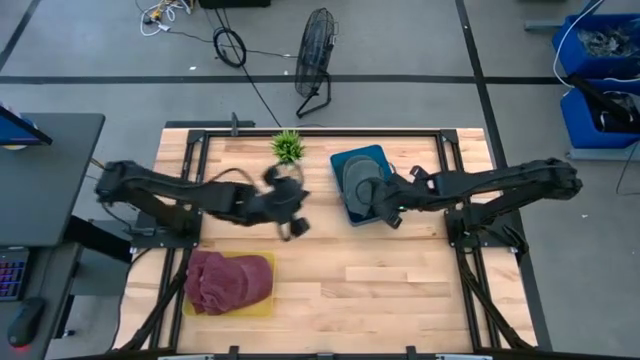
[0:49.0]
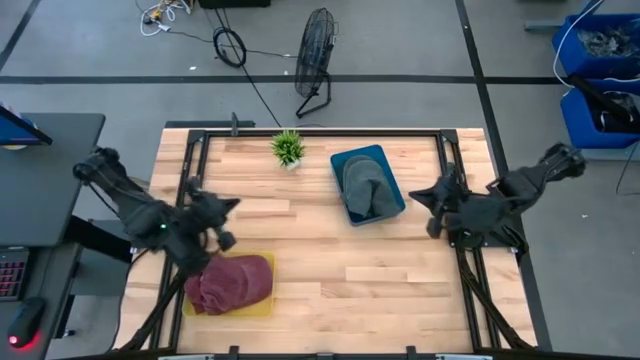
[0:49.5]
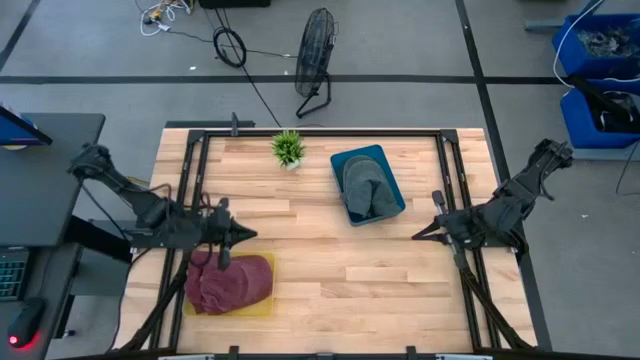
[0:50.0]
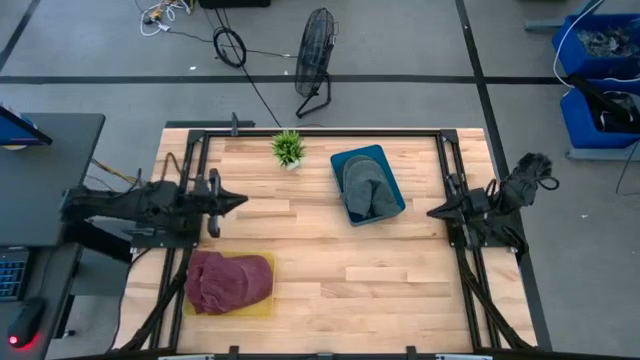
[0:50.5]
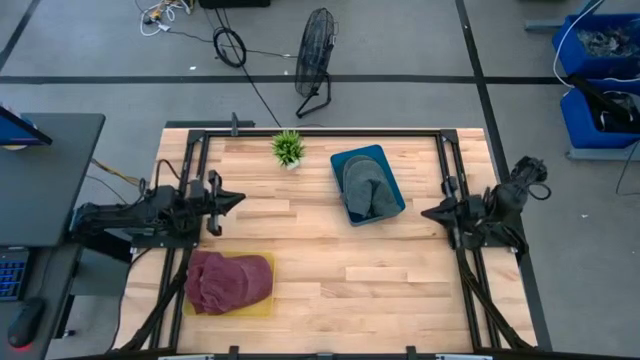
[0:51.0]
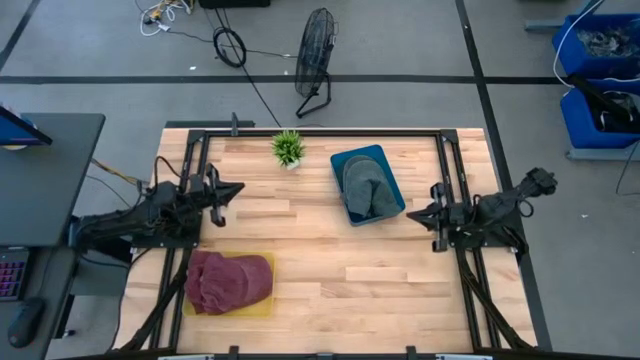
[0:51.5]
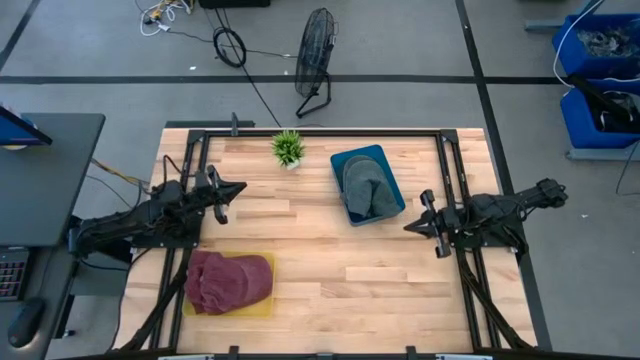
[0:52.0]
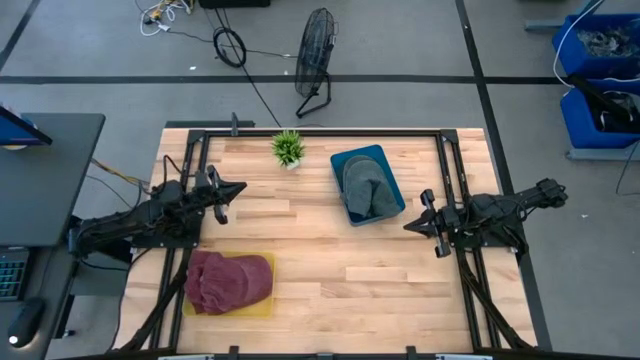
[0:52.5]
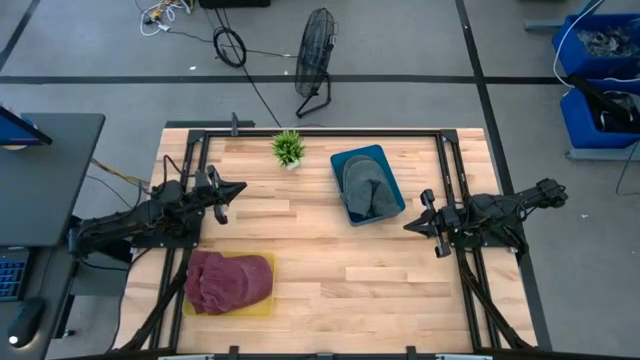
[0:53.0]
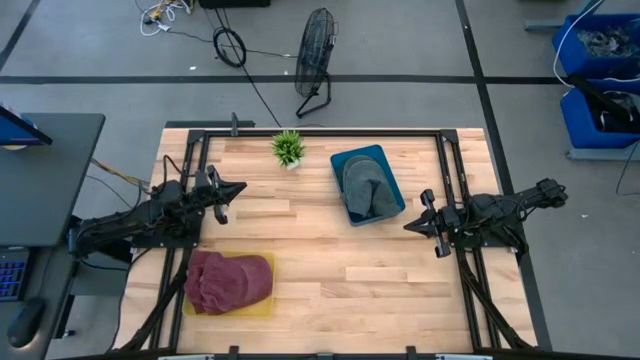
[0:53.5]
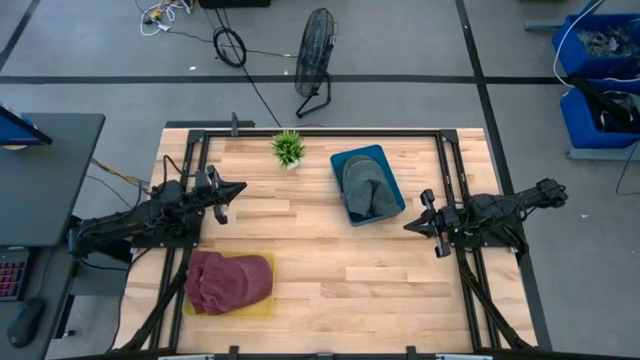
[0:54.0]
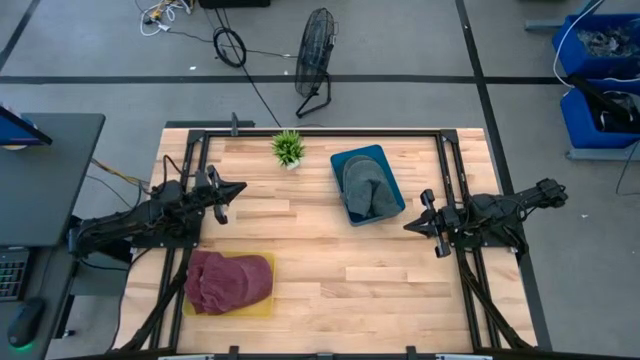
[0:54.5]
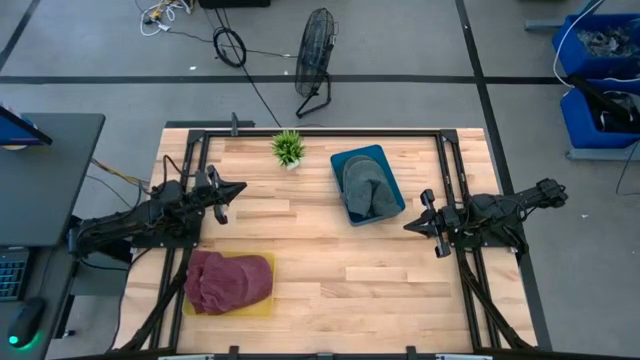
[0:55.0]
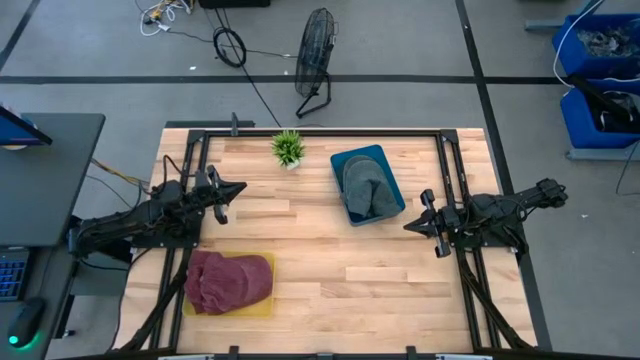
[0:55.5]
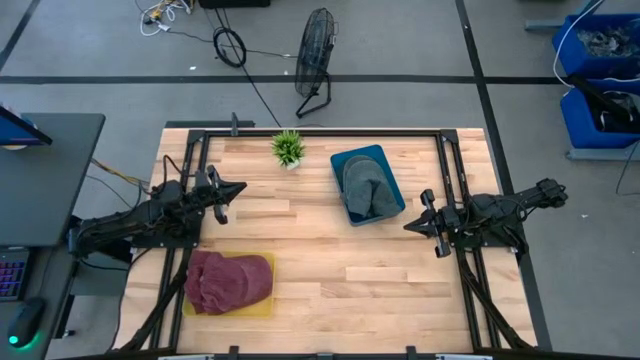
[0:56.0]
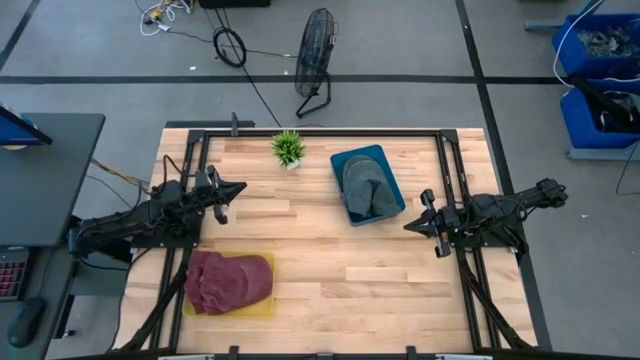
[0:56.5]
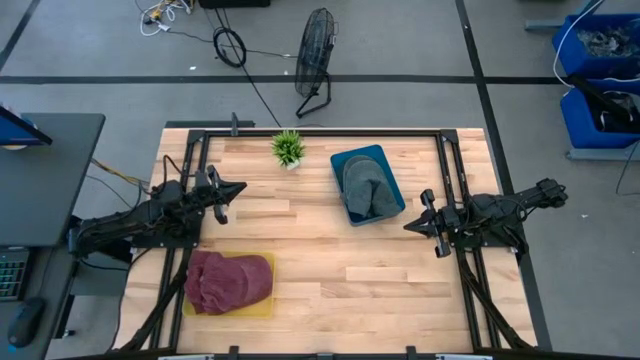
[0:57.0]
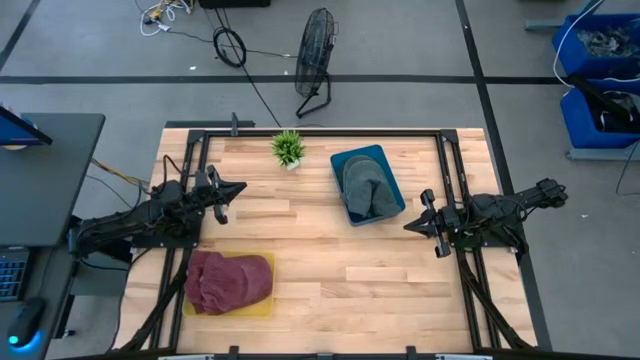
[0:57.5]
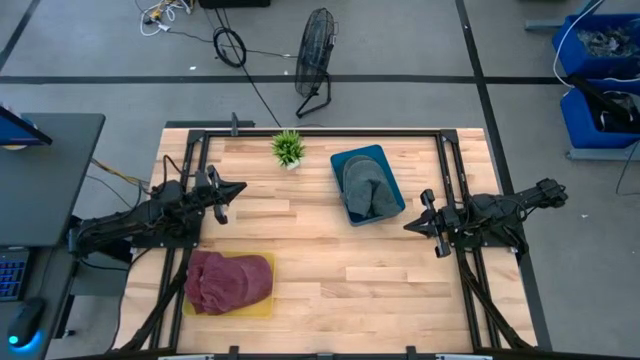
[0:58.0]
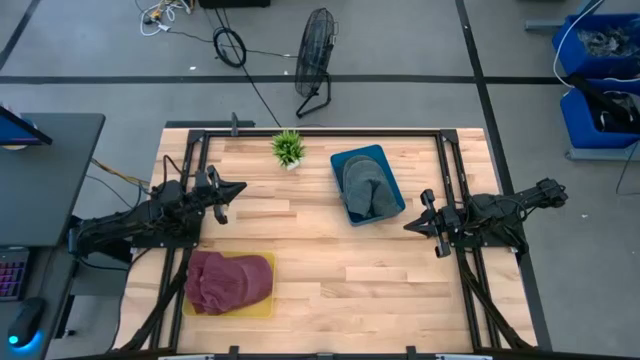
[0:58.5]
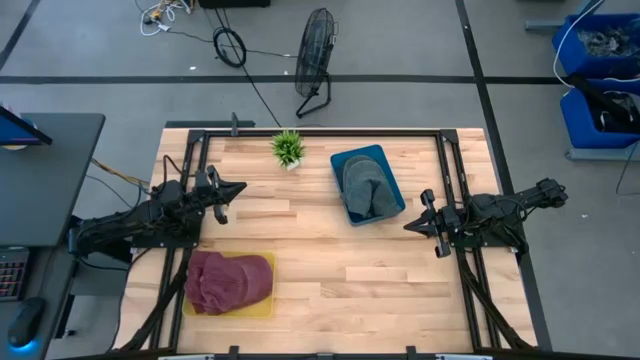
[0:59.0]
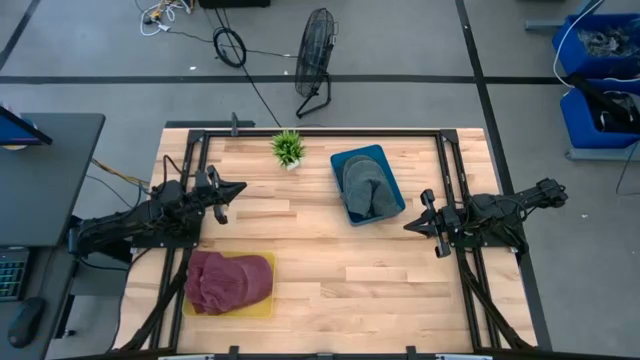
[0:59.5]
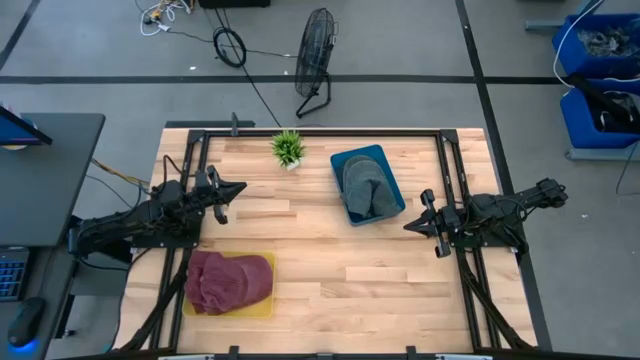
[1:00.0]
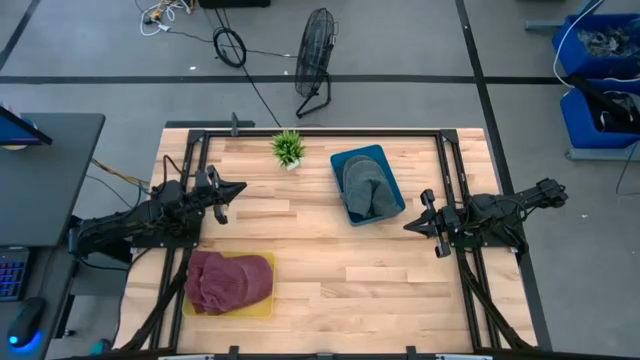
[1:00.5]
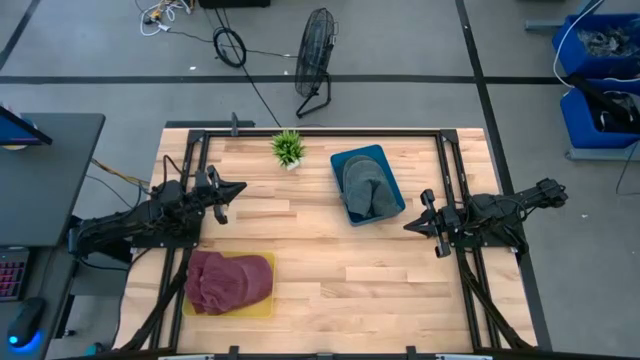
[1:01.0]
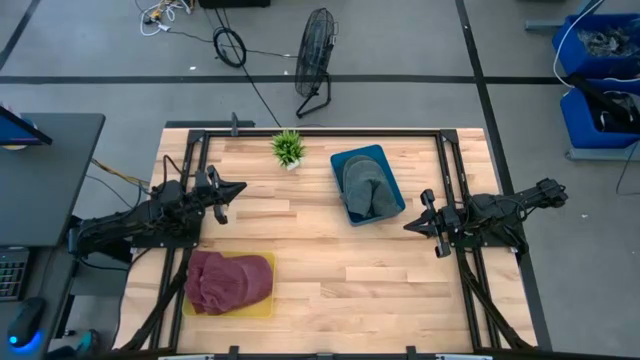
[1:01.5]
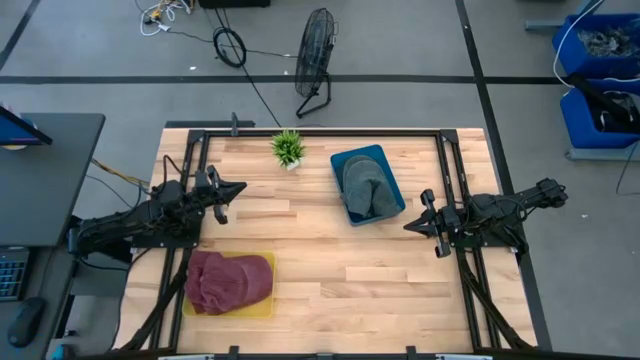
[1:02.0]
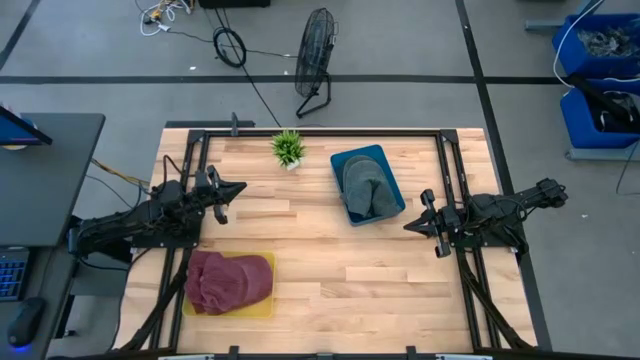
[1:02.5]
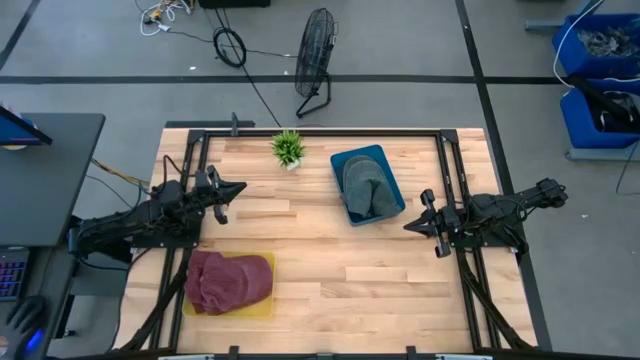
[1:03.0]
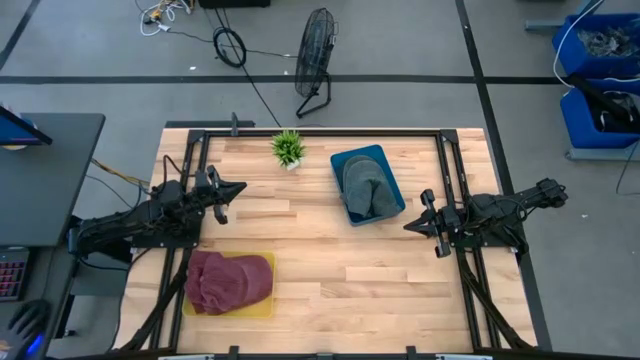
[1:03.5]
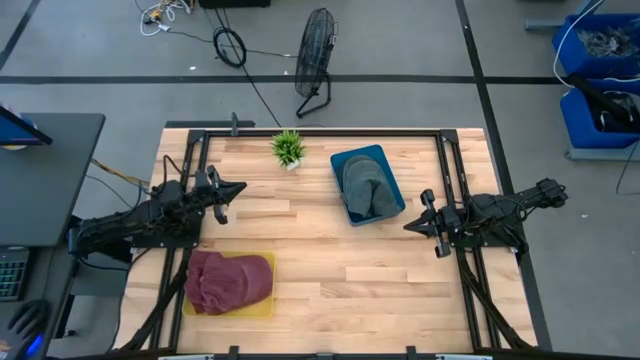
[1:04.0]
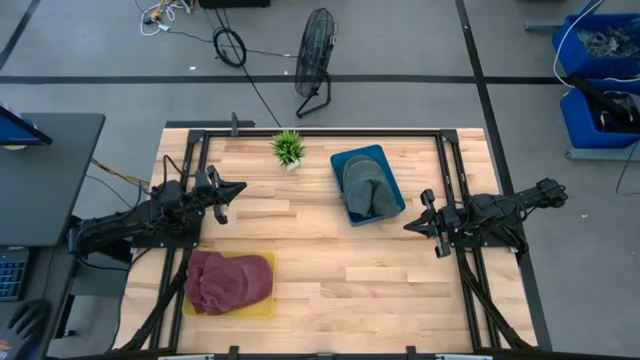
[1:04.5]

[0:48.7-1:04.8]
Task: Pick & Place hat
Return to Home Position

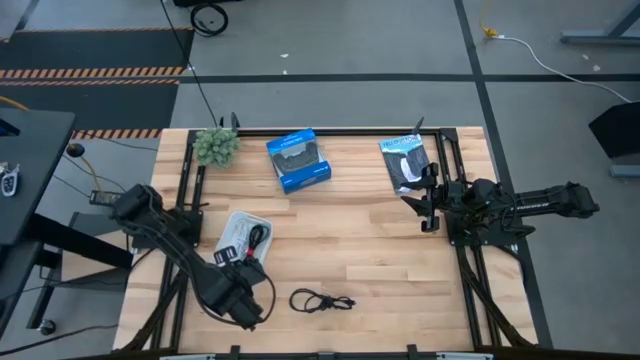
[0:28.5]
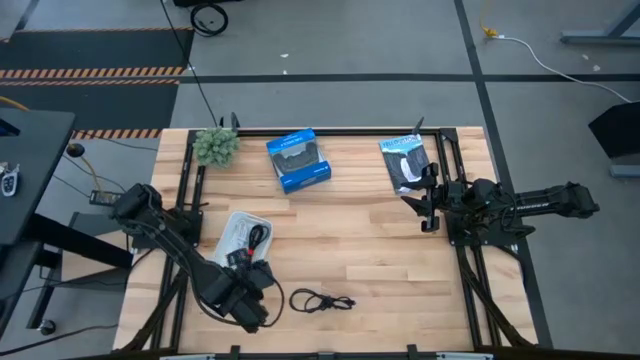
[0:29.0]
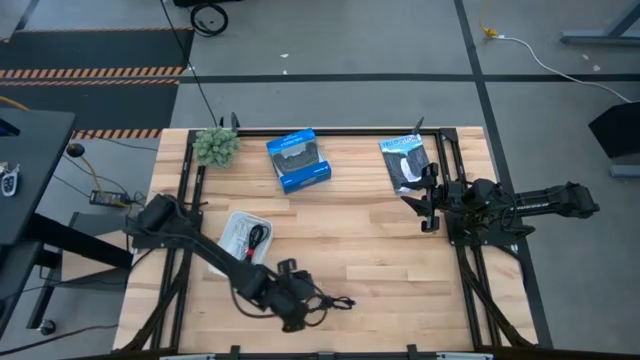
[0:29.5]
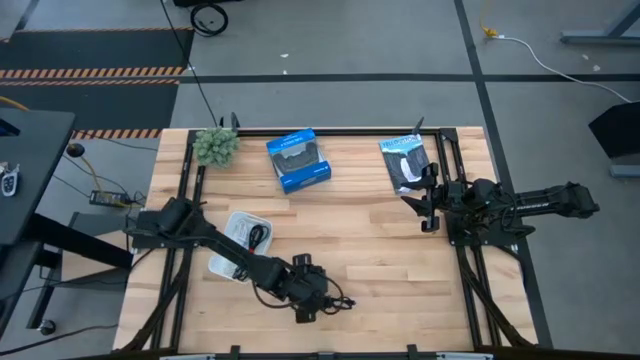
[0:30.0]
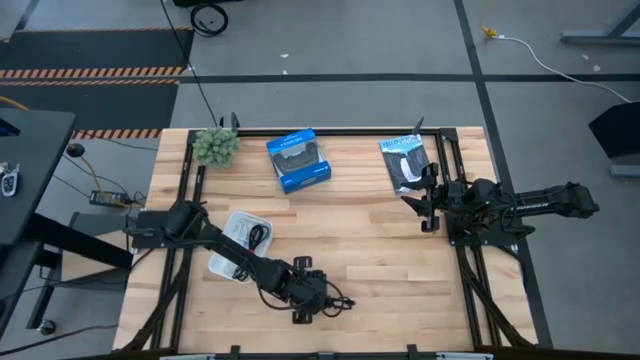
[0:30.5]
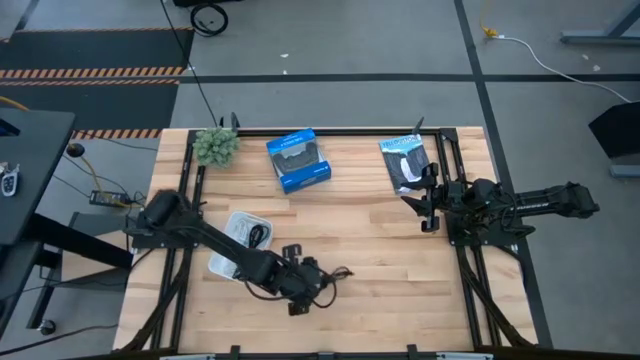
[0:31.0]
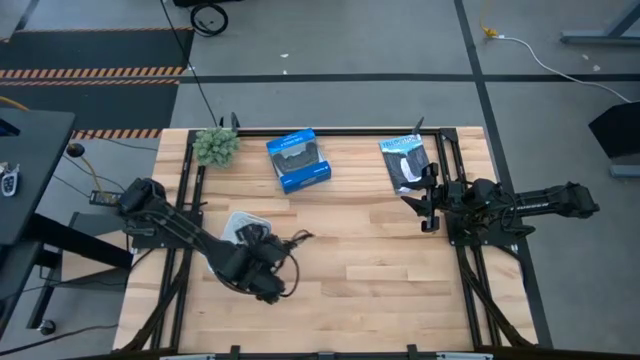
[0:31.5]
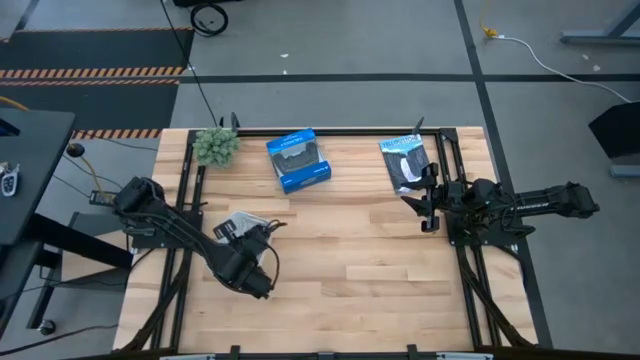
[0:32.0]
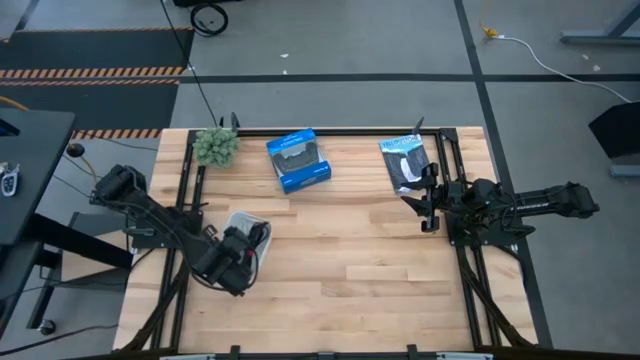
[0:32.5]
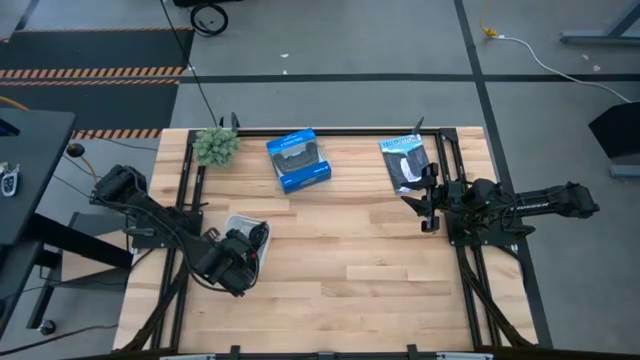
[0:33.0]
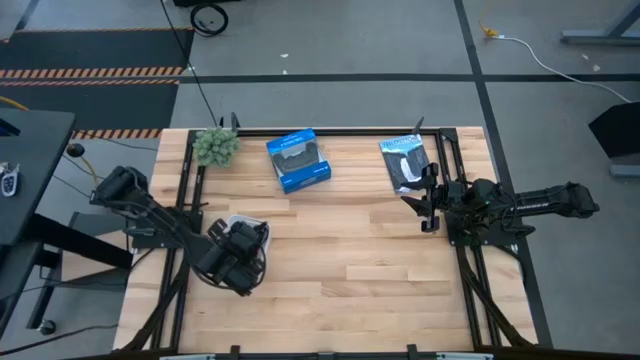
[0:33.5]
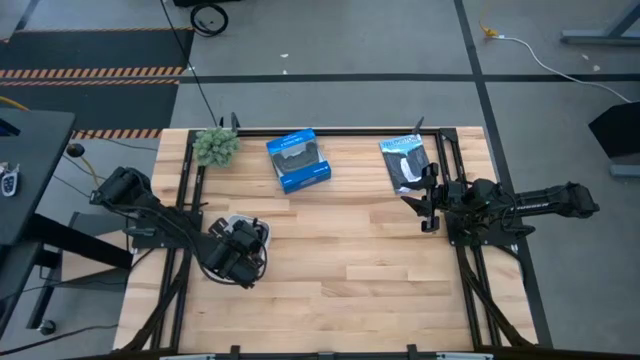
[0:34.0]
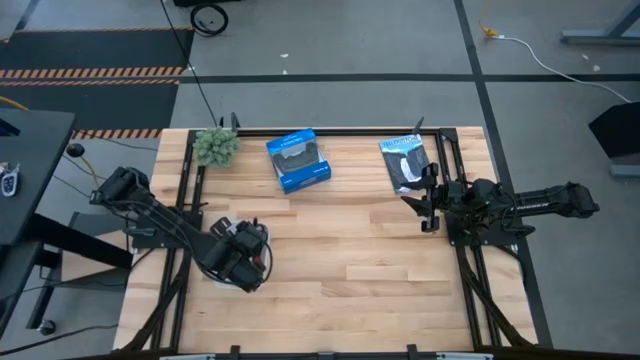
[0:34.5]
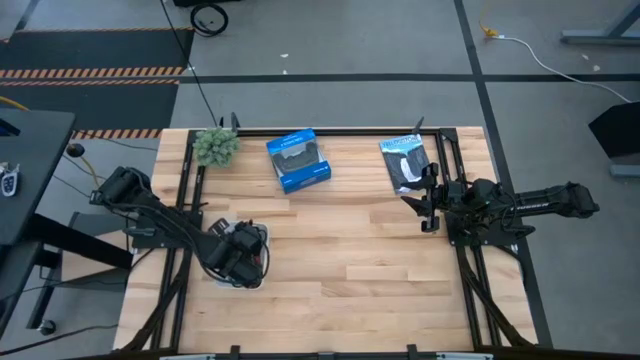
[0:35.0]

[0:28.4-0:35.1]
Task: Pick and place USB-C Cables
Put the black charger cable into the white bin
